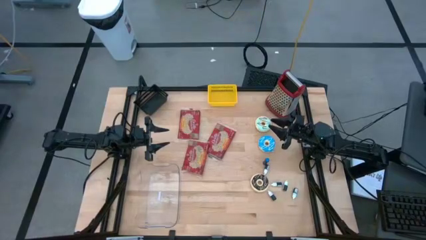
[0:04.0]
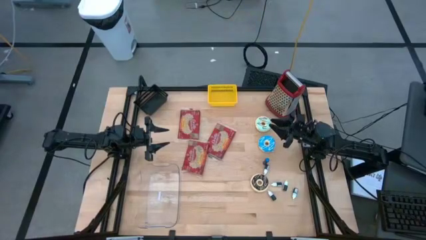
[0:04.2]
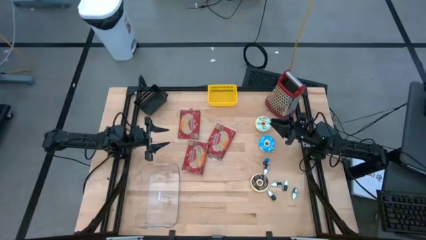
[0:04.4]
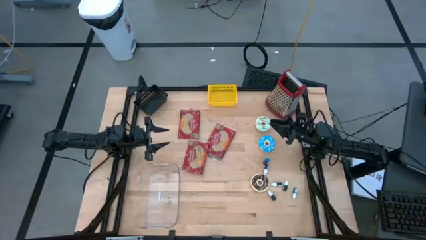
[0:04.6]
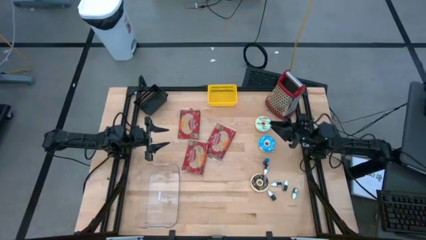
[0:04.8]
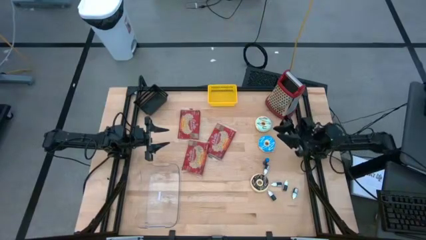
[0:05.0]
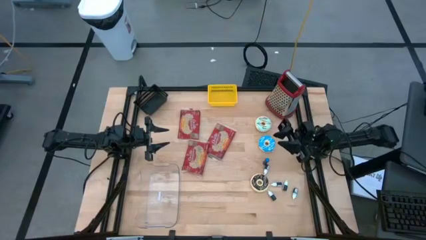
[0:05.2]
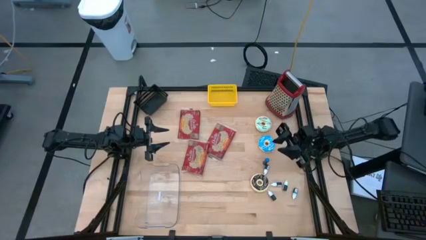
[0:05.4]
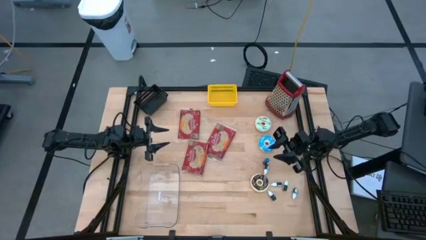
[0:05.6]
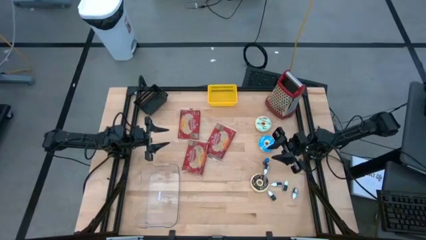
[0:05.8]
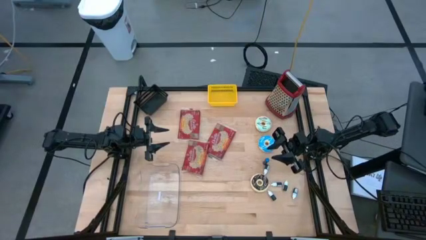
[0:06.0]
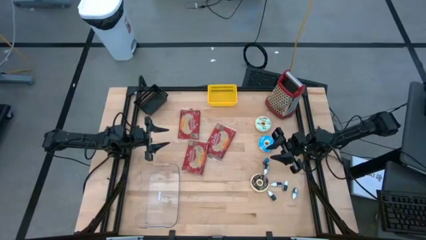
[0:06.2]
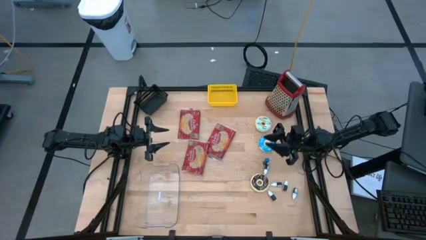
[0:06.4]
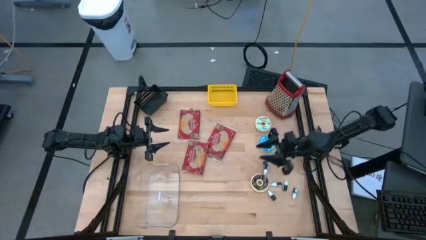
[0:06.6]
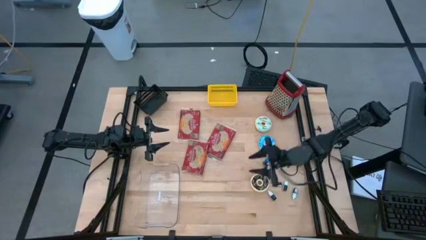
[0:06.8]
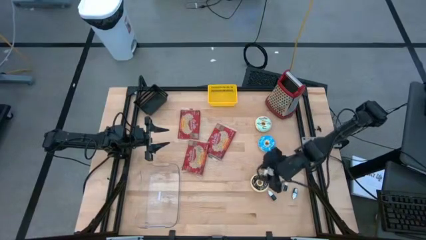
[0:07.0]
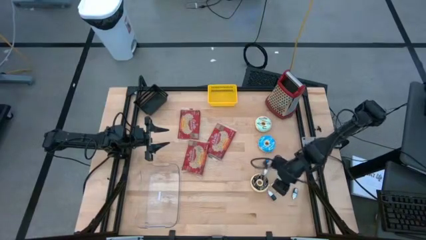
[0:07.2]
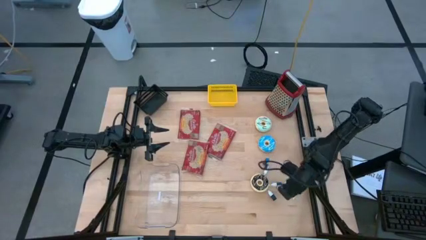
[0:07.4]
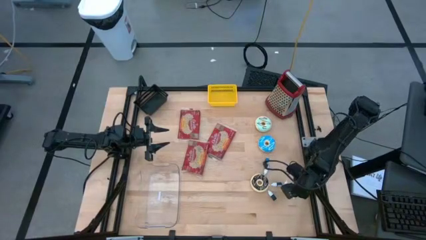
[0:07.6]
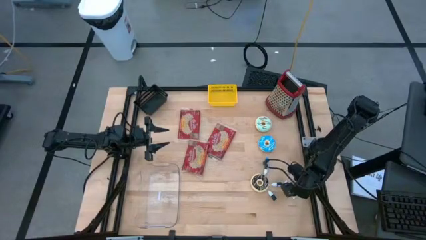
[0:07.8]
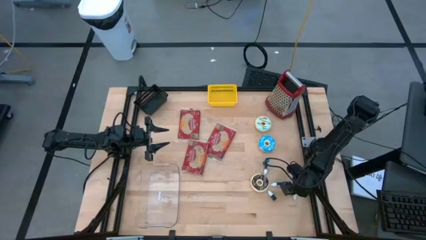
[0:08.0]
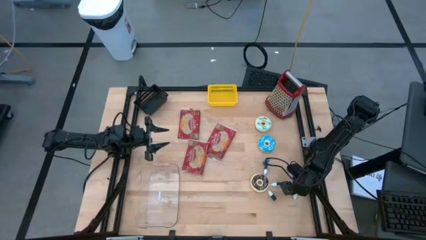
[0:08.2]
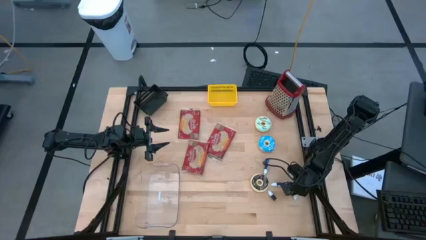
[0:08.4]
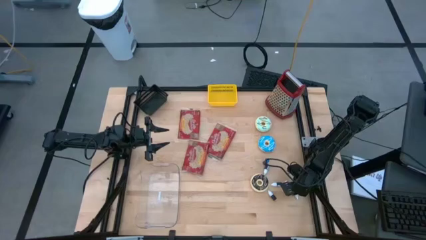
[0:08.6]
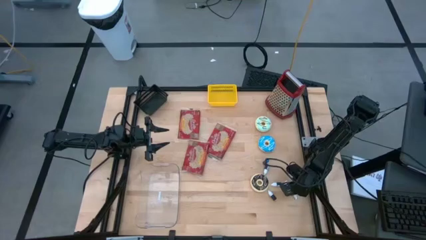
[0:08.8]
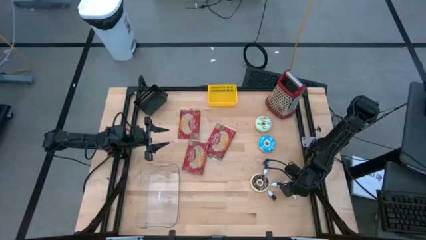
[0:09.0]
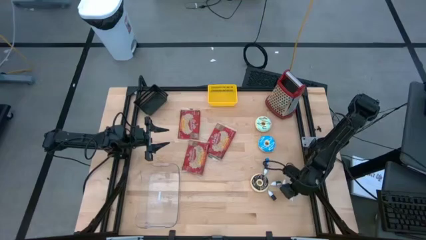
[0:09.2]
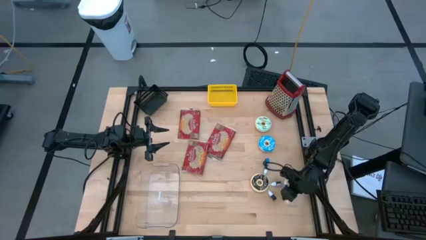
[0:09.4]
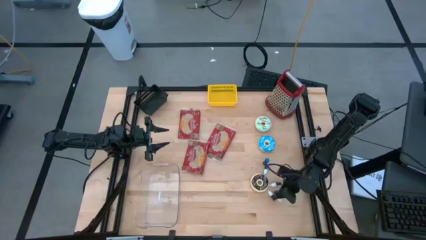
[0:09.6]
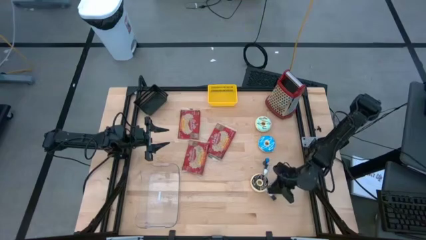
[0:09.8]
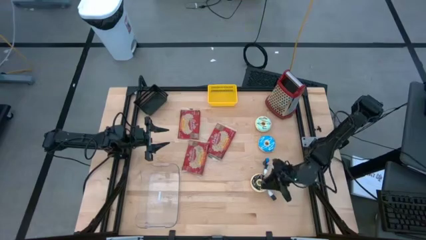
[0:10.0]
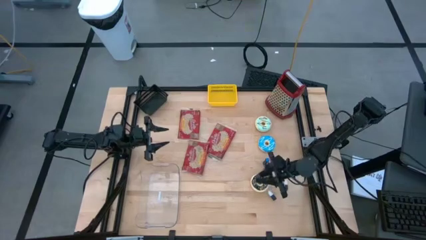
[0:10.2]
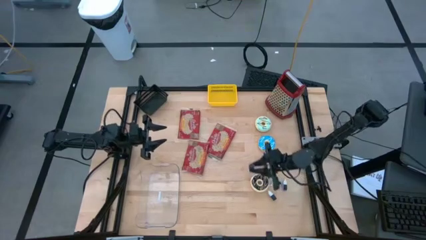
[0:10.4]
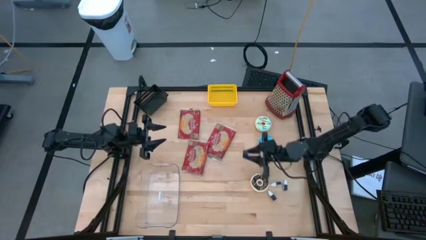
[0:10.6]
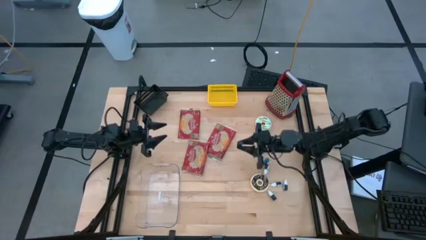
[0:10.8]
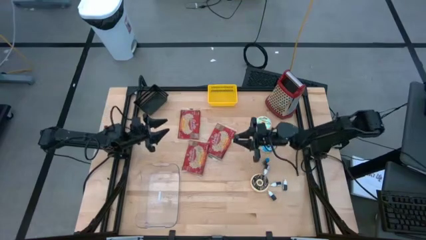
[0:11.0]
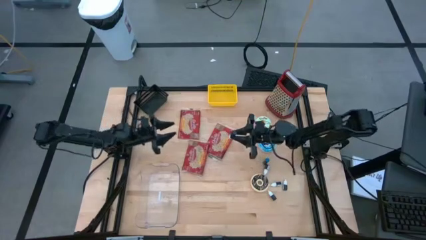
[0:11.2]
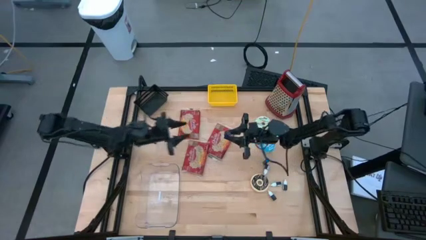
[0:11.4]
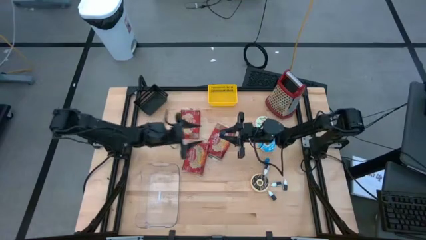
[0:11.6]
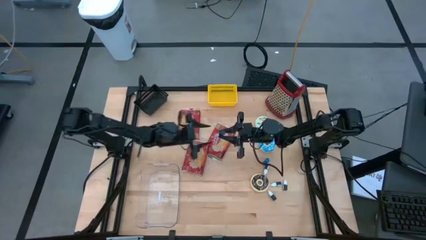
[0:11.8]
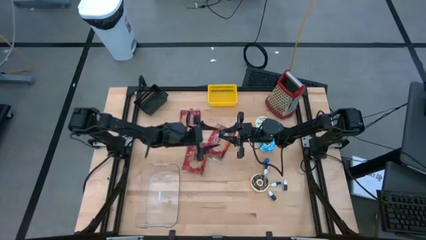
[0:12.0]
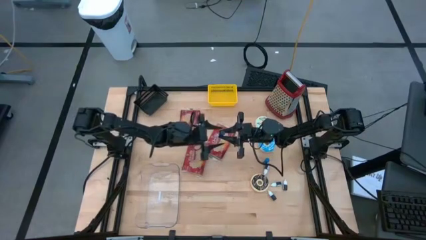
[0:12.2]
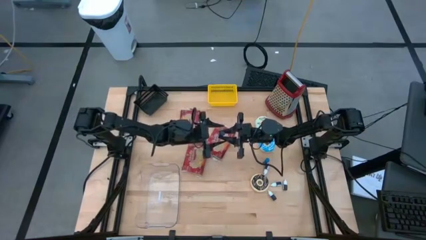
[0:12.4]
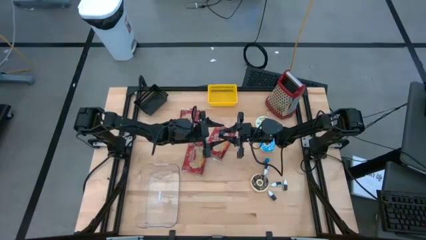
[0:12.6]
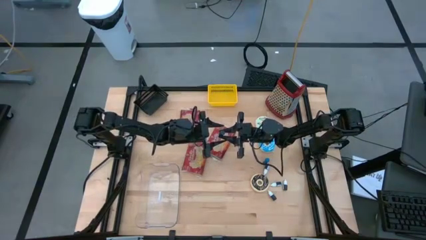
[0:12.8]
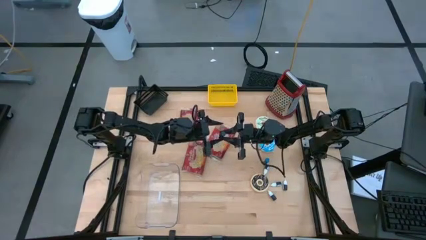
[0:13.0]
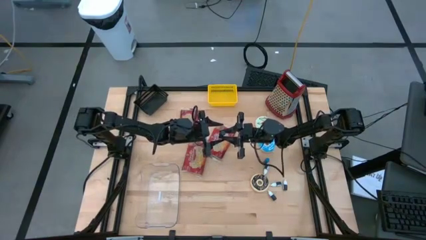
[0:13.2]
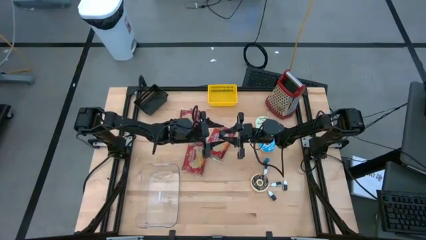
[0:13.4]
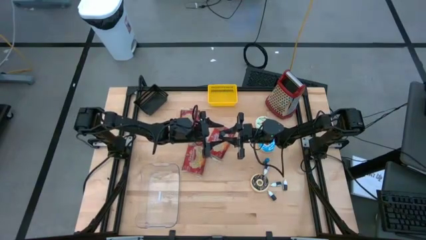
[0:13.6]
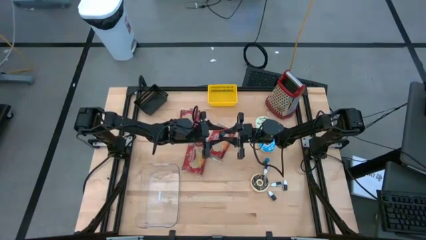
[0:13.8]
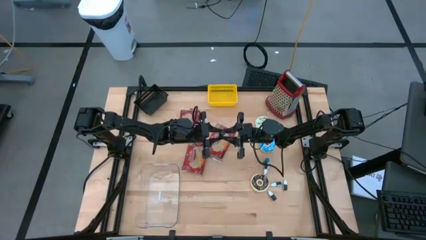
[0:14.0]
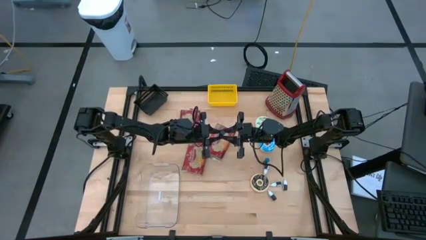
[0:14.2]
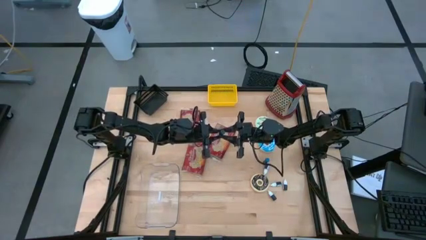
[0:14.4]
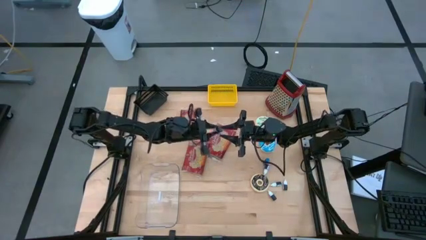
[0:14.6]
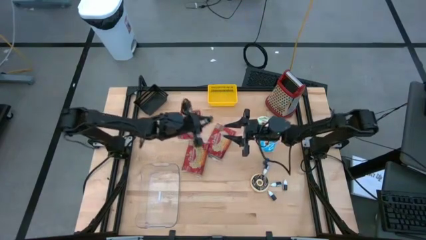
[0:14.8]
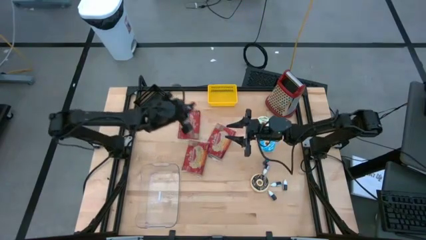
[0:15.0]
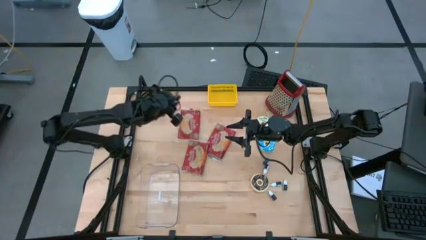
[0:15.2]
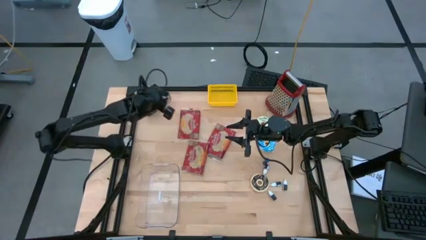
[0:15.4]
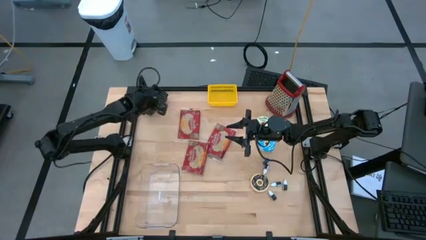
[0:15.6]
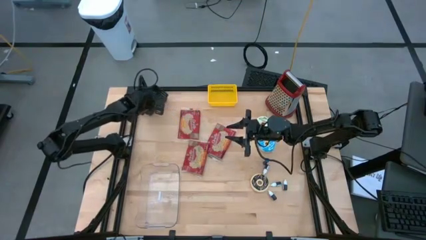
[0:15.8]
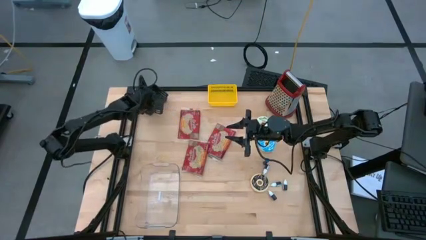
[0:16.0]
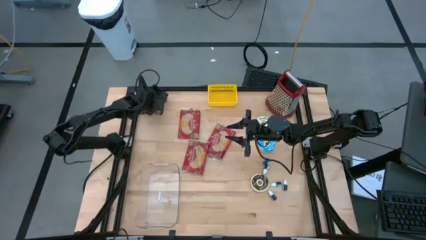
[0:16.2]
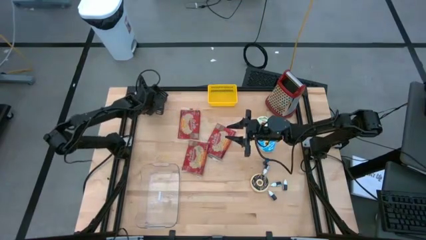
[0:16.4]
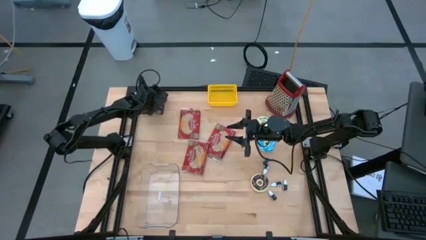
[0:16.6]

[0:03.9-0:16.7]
Put the brown food coloring bottle into the black bin
